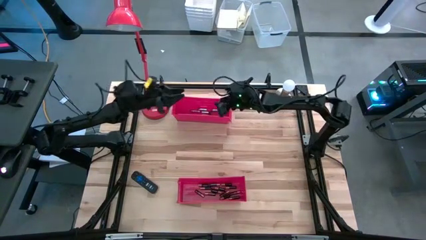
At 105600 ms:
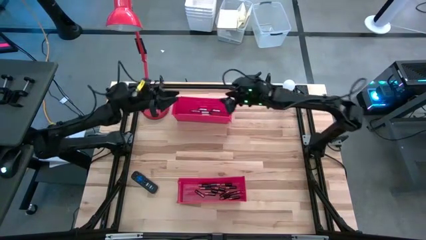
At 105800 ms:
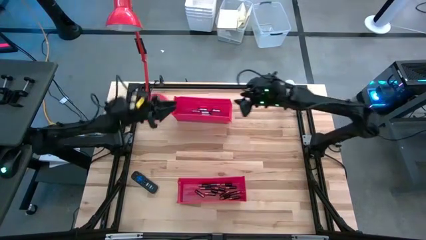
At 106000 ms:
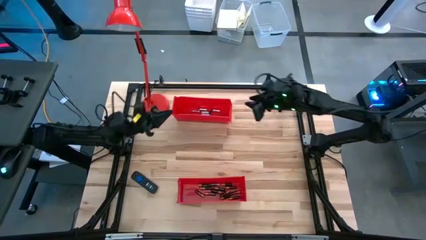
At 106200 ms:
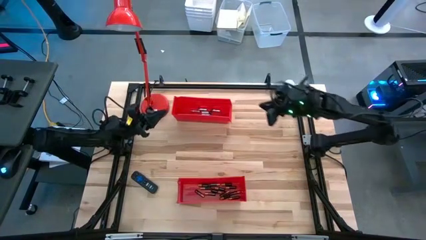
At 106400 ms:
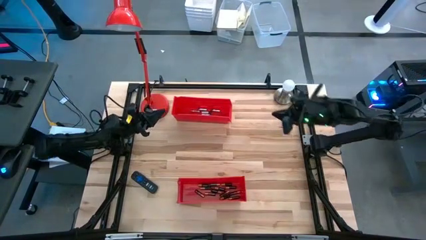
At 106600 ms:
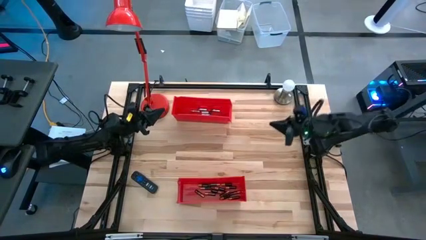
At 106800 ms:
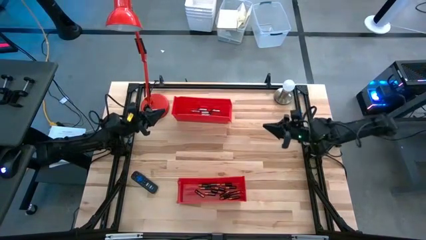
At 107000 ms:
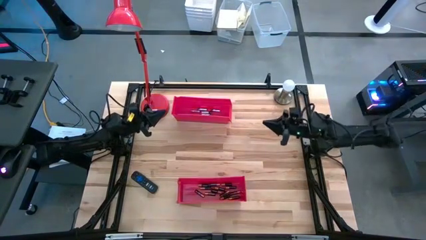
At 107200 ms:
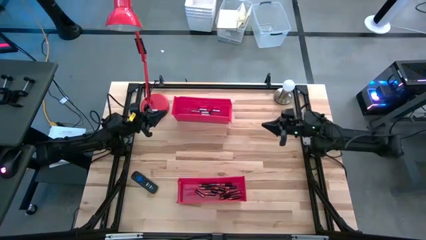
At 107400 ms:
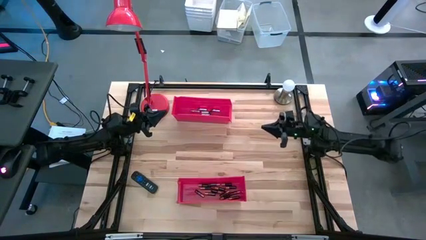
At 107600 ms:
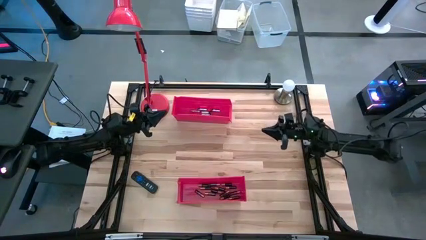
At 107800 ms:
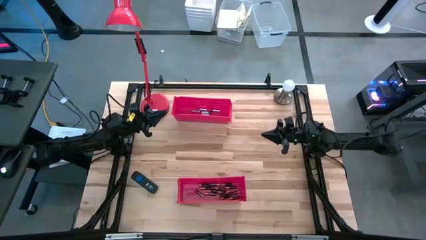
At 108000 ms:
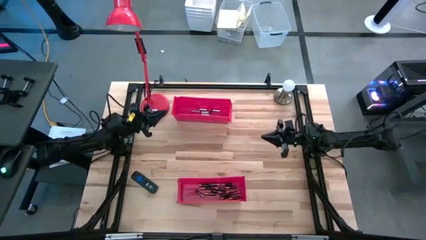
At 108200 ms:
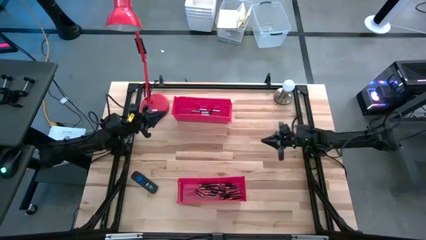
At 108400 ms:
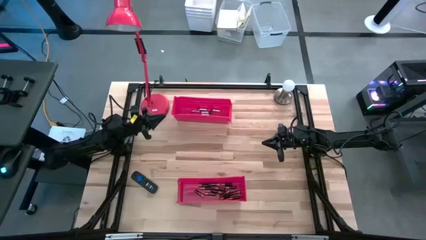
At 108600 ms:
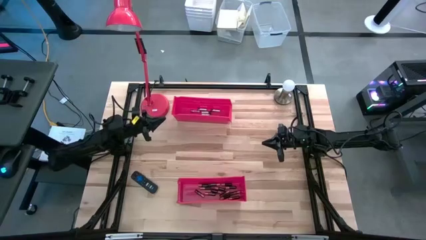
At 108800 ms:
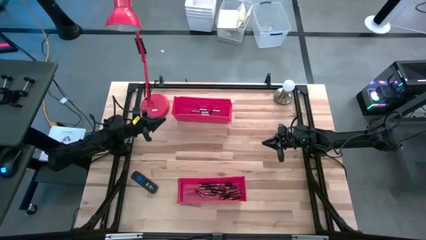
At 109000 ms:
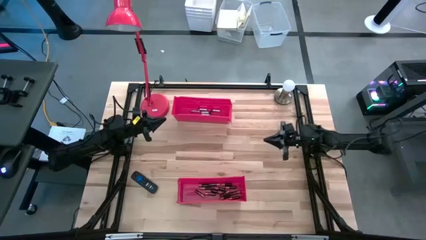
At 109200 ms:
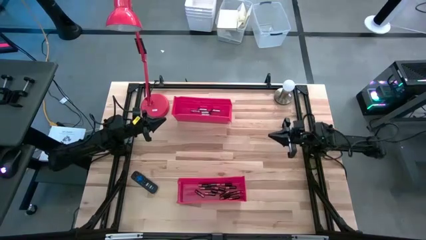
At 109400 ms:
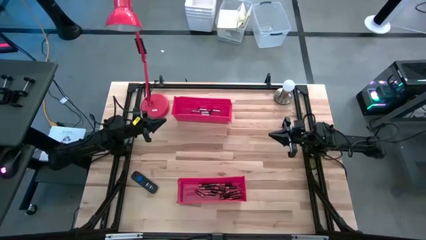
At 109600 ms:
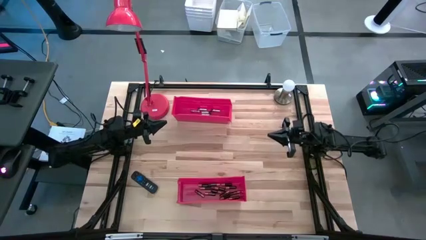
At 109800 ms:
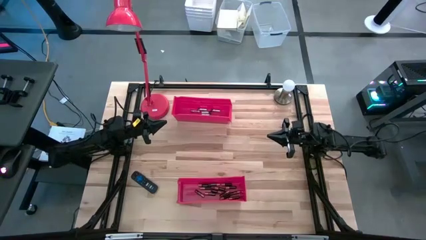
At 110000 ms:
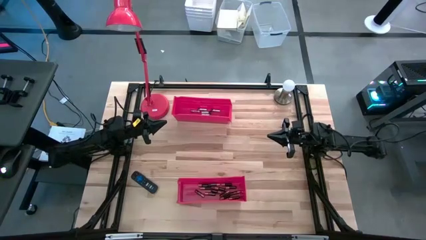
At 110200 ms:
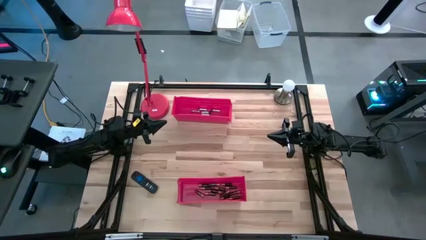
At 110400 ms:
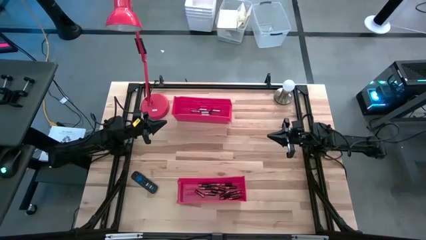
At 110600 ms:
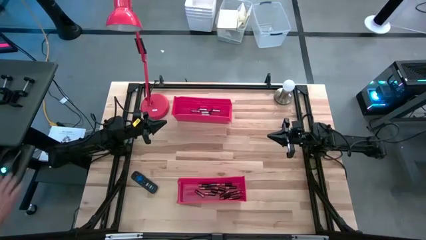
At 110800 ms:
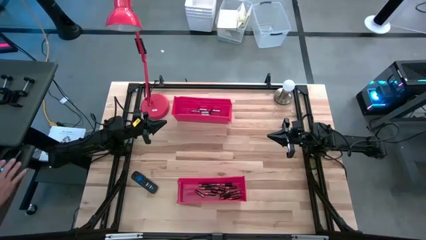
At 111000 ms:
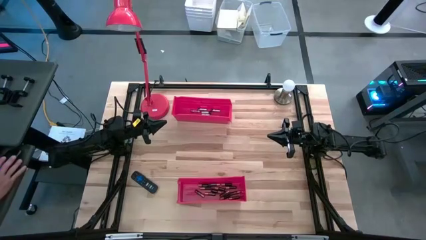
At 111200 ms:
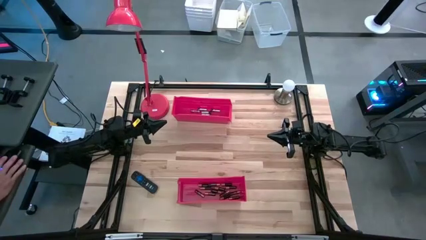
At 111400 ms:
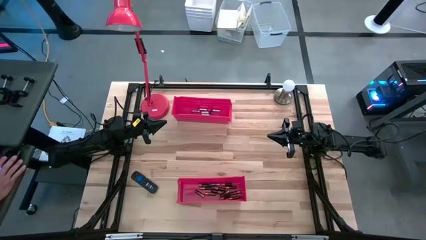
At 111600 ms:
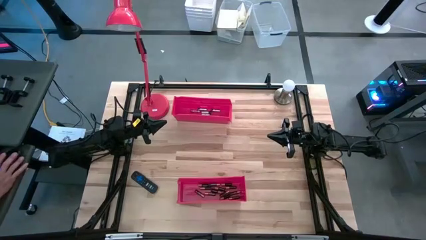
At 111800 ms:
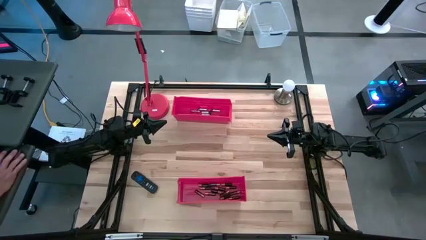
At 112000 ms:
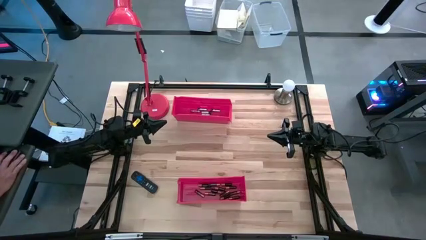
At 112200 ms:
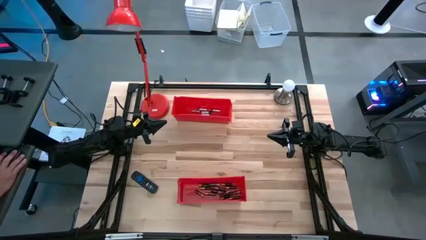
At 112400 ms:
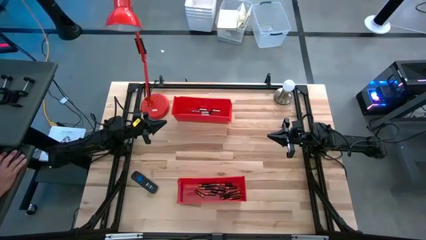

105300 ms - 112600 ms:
Task: Sort batteries
Return to Home Position

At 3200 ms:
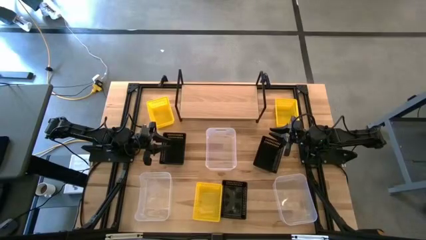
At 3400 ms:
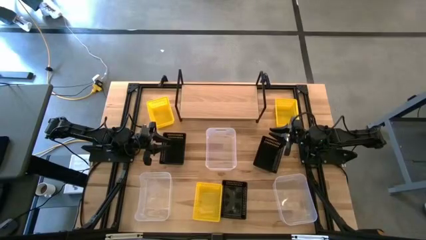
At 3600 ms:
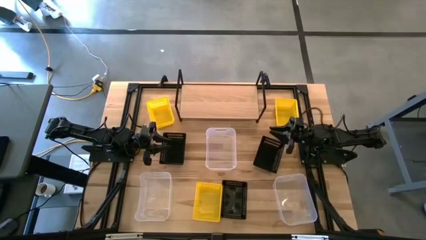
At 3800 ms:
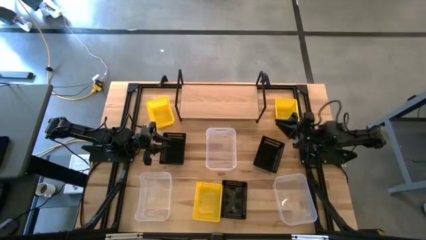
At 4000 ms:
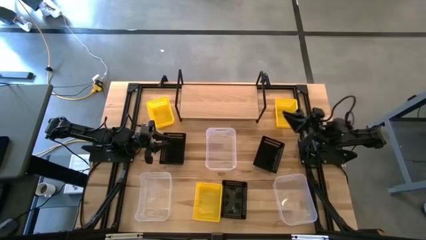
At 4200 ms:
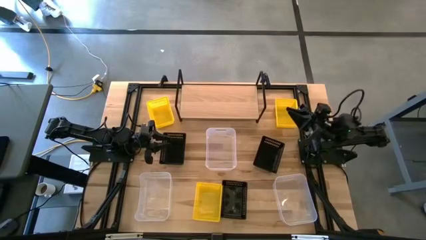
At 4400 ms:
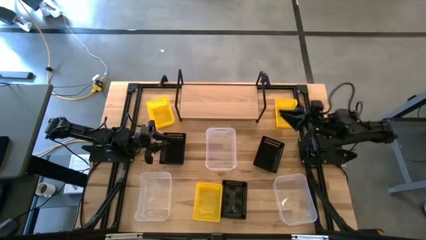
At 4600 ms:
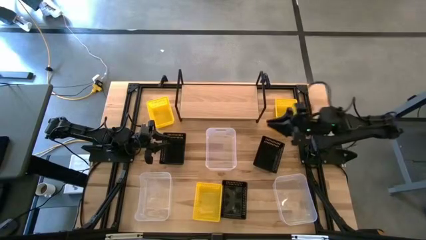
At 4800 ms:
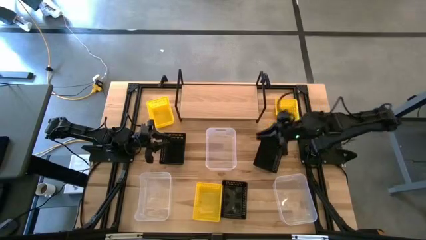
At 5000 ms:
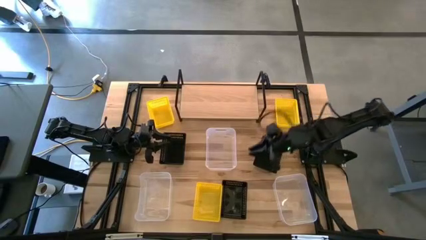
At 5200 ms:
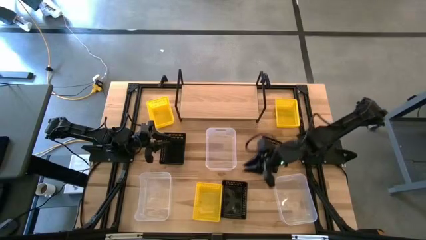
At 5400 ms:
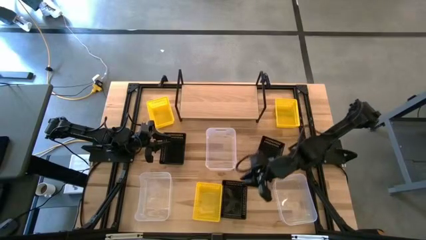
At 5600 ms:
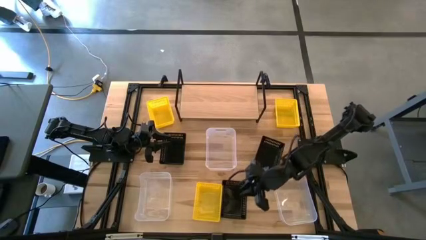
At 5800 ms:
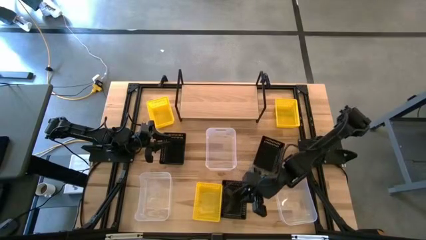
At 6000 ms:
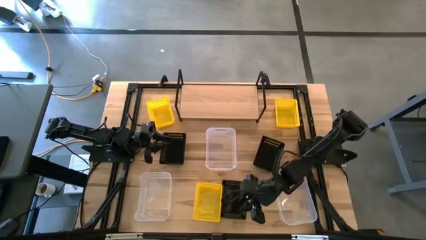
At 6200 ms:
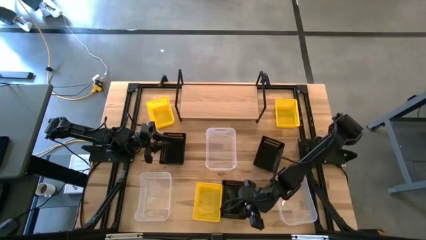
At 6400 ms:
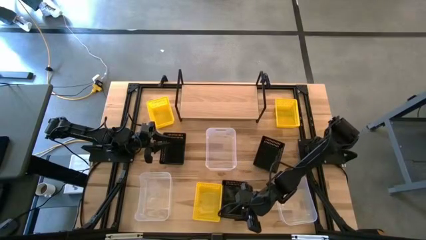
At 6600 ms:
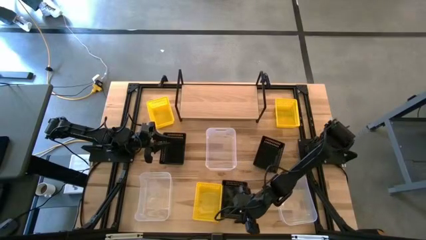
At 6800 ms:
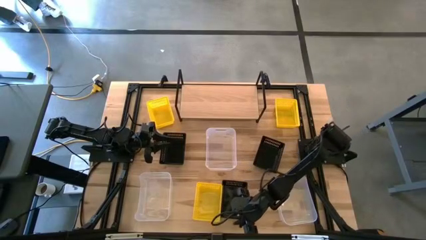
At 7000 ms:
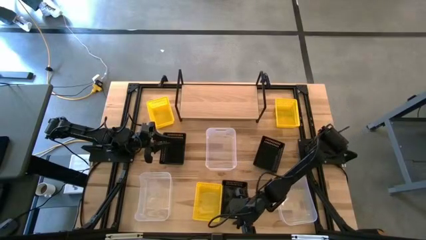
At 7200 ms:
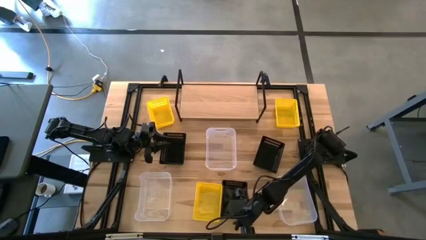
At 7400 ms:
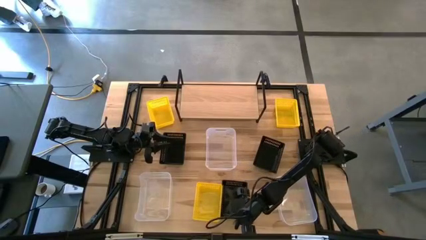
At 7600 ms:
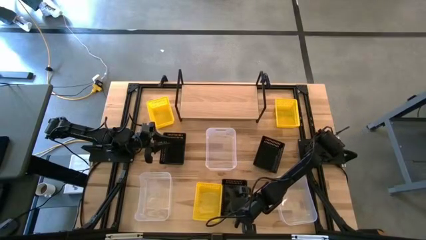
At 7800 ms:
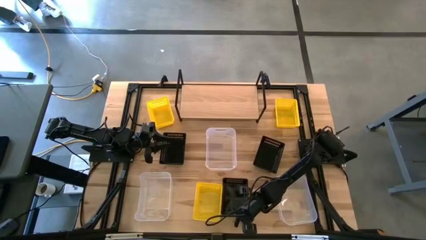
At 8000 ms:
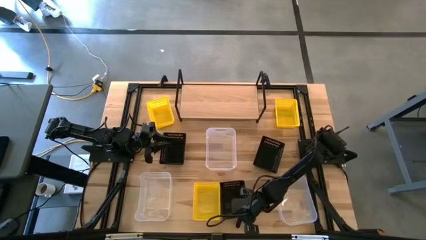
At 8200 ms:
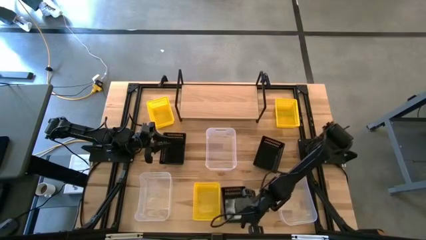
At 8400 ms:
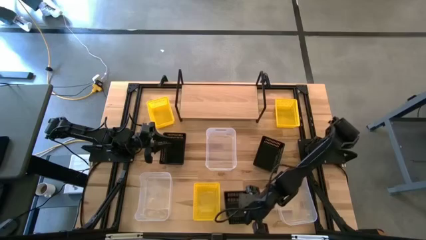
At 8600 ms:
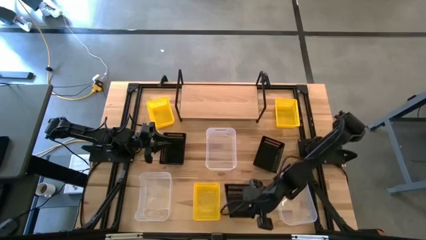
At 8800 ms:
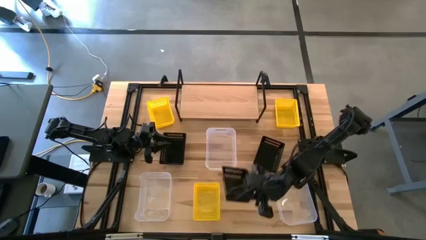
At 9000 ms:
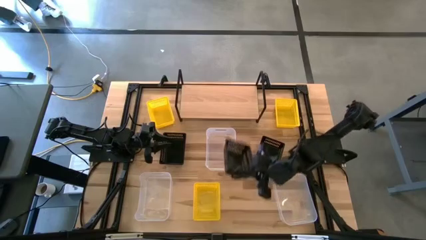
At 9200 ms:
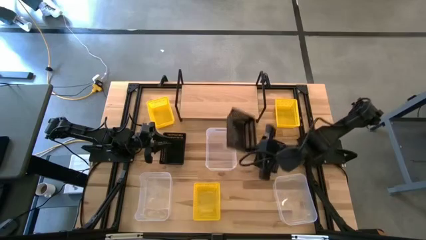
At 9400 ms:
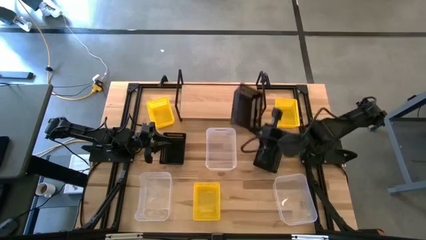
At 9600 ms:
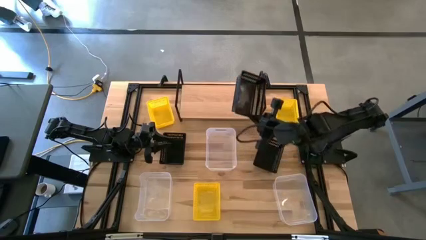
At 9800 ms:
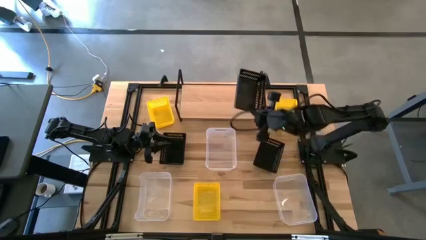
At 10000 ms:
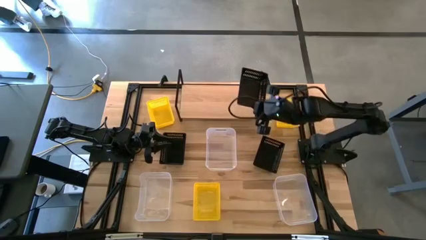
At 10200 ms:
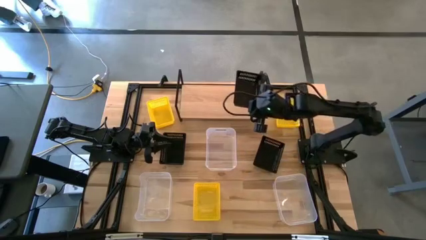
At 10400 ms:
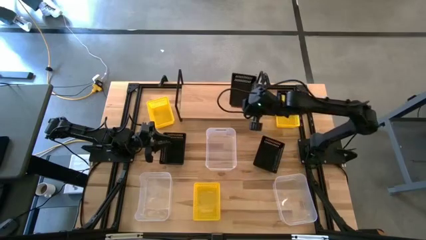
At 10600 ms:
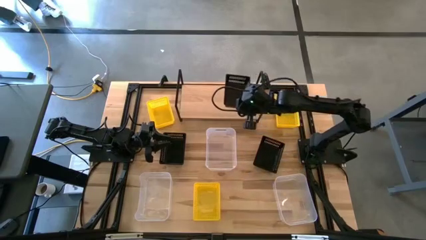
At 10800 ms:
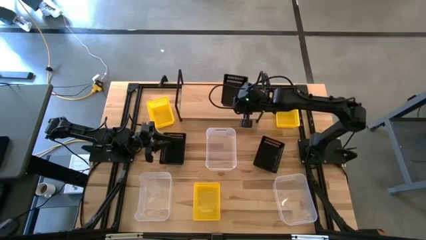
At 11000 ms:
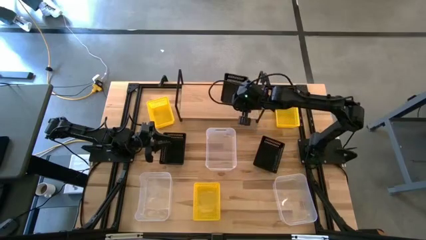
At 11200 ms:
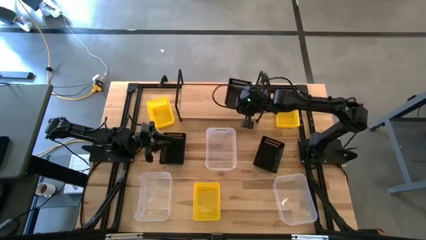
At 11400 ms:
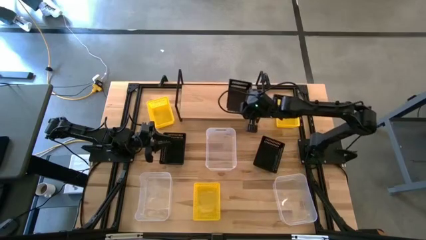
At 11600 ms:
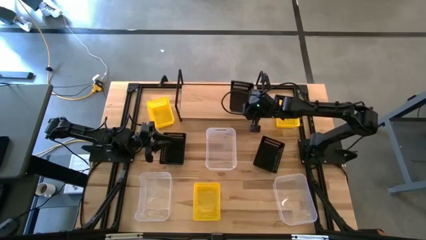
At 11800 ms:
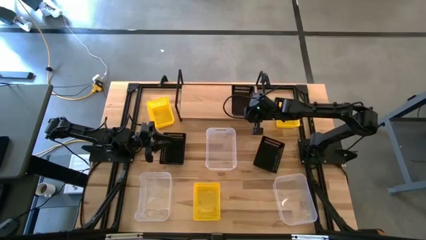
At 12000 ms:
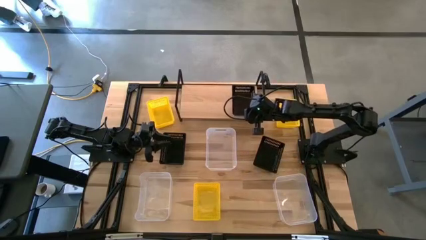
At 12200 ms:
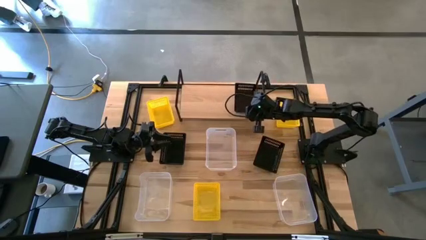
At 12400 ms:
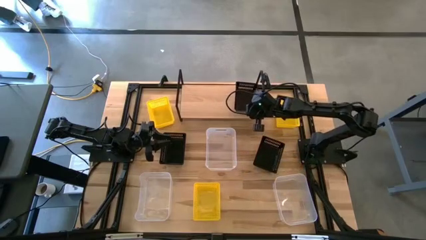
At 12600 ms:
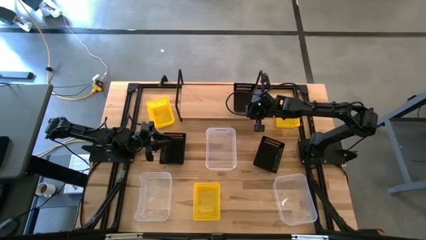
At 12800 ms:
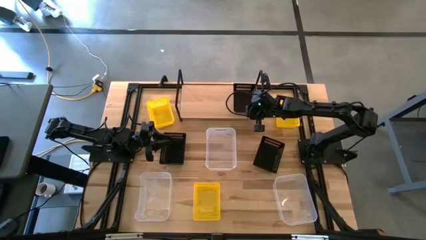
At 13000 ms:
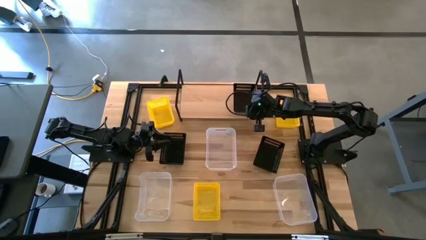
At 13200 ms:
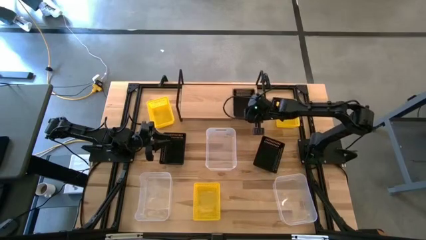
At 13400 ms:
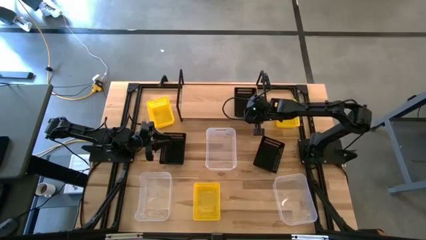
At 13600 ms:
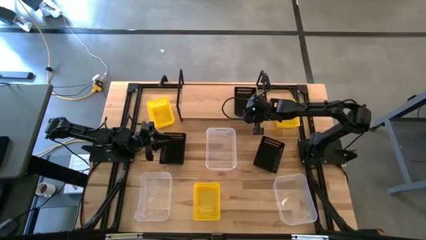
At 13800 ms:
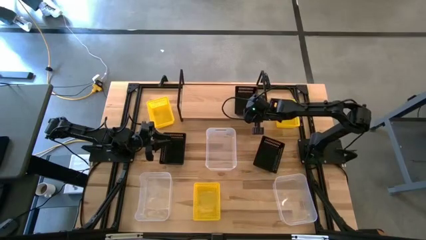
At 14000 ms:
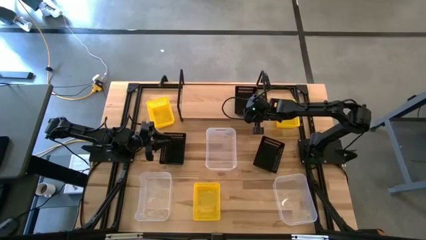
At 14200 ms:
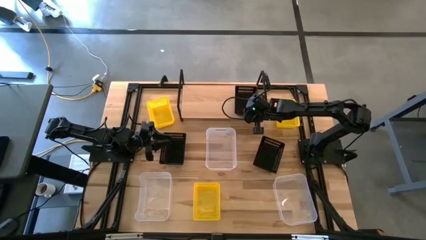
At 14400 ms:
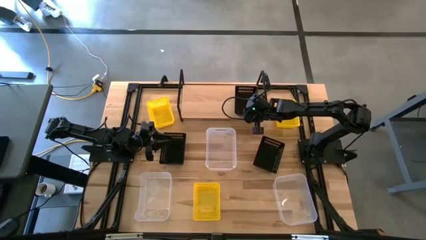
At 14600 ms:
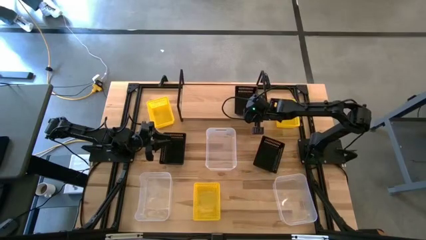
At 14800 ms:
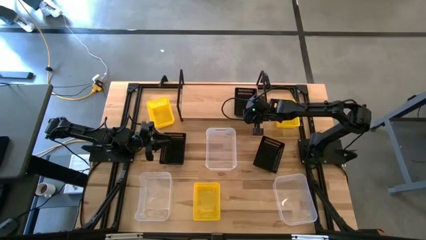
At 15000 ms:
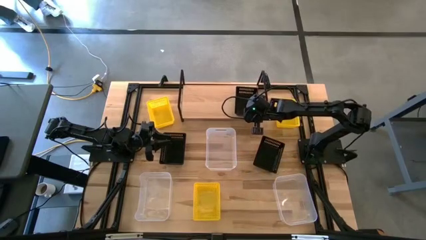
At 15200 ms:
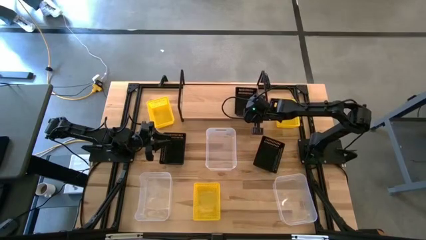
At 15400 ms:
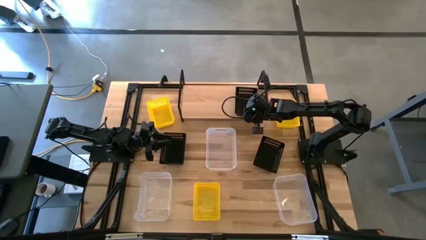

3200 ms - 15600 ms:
Task: Stack baskets on shelf by color
Put the bottom black bin on the shelf
